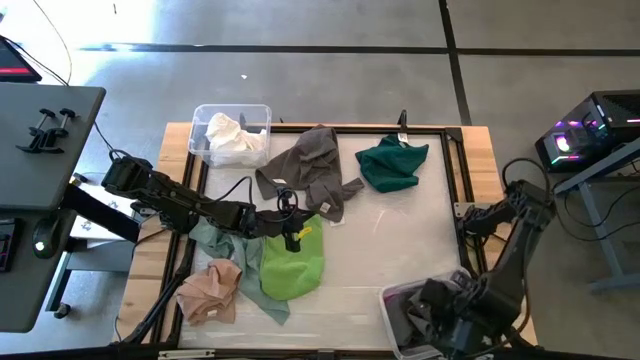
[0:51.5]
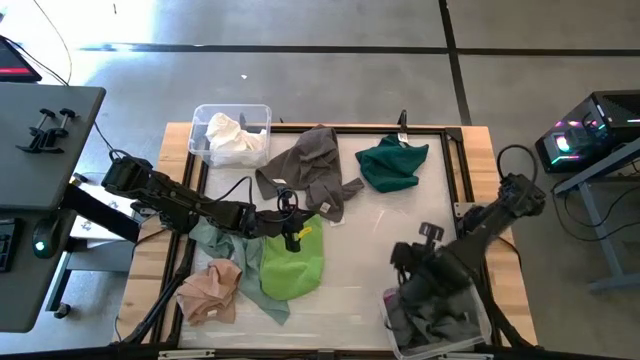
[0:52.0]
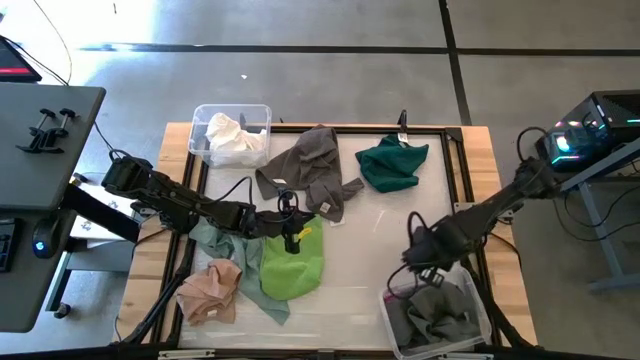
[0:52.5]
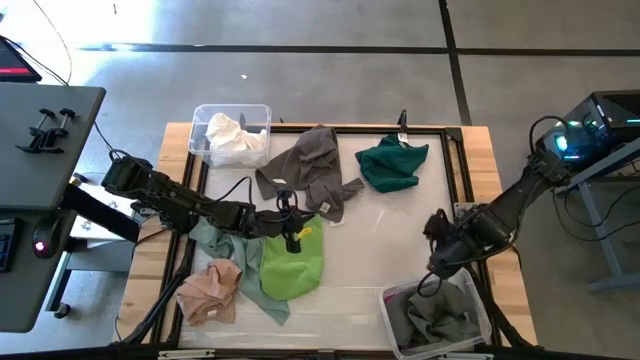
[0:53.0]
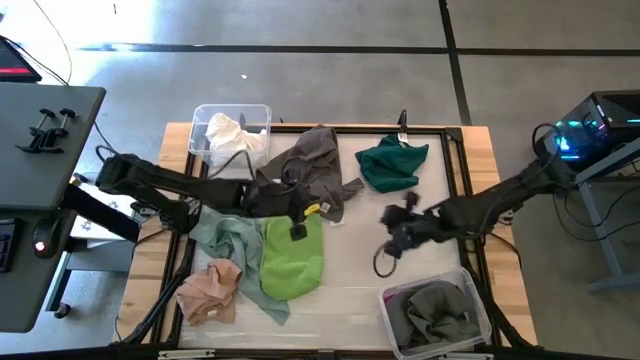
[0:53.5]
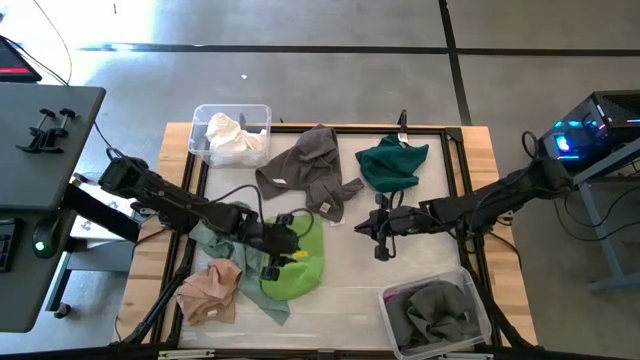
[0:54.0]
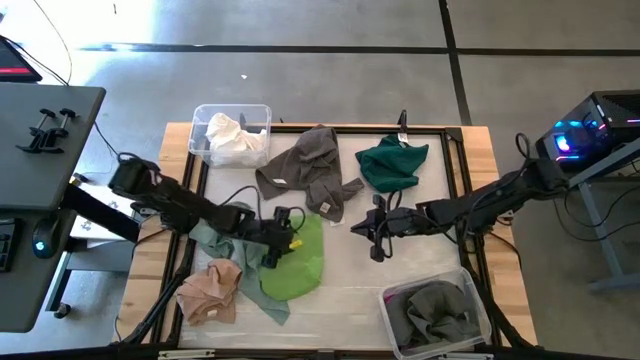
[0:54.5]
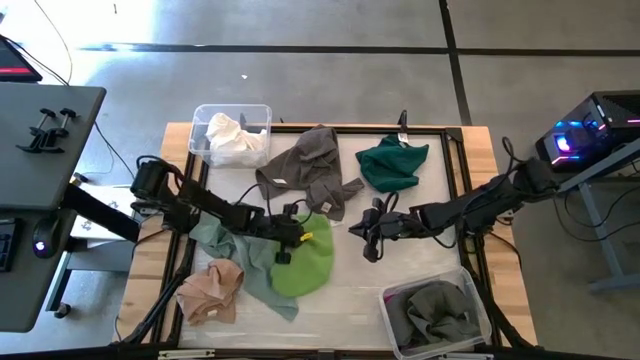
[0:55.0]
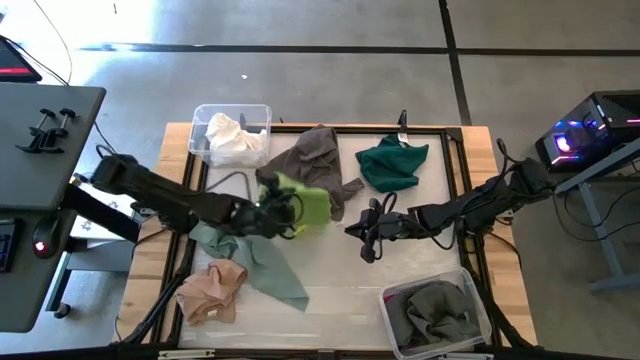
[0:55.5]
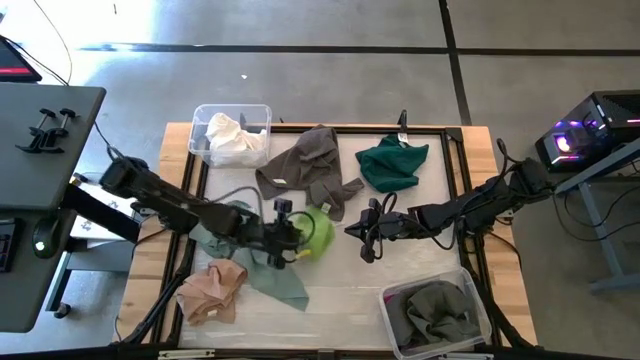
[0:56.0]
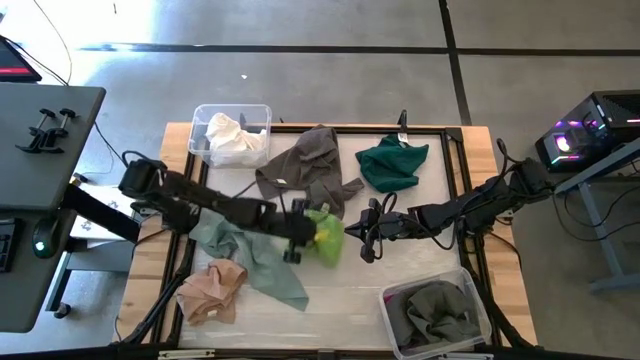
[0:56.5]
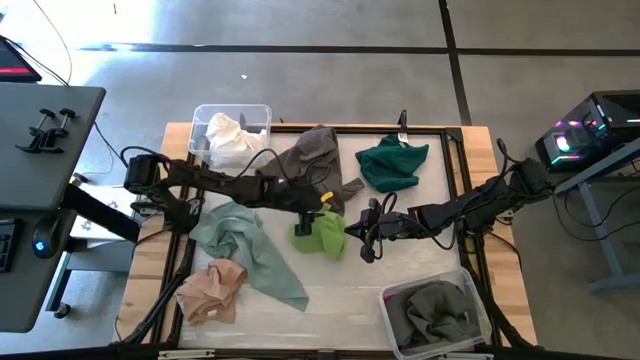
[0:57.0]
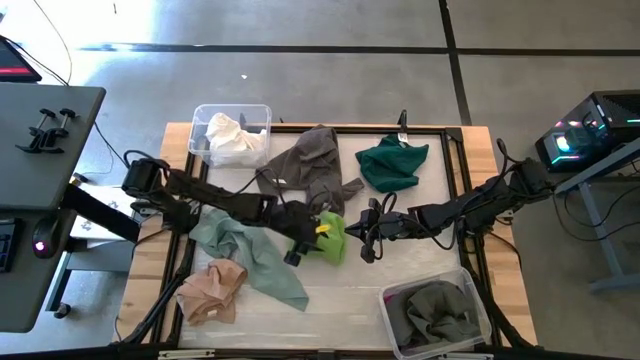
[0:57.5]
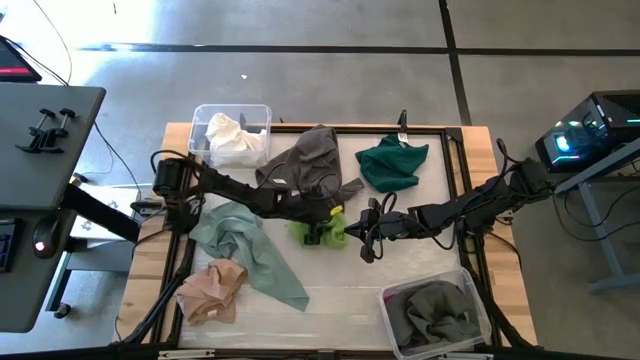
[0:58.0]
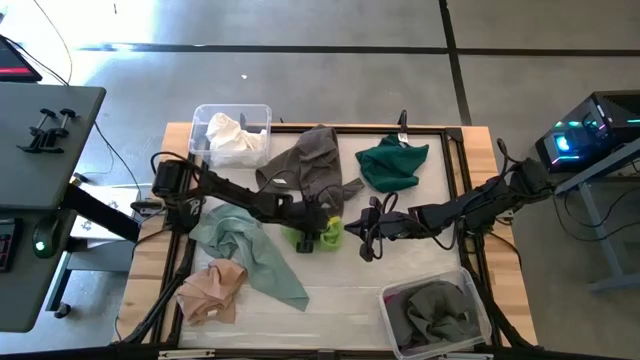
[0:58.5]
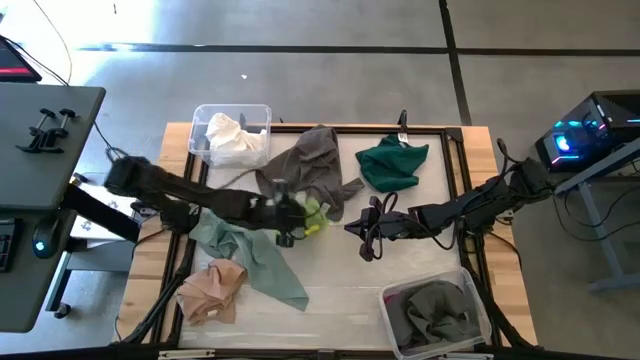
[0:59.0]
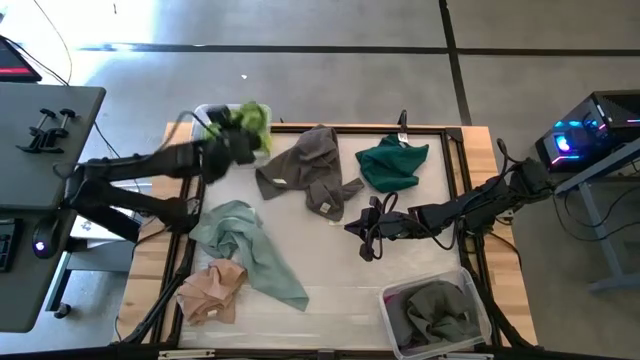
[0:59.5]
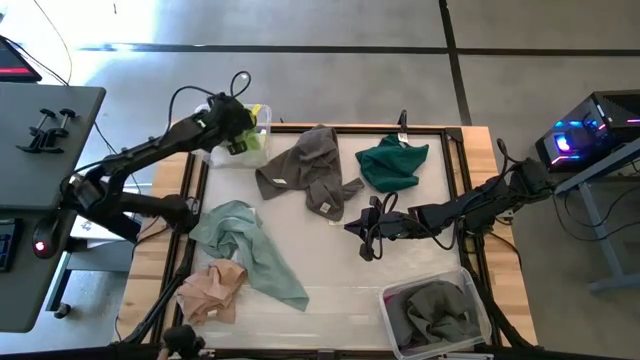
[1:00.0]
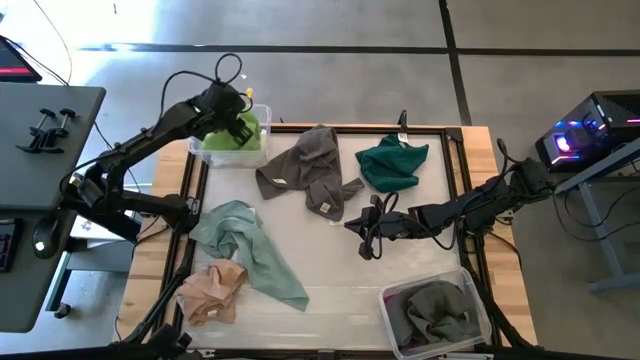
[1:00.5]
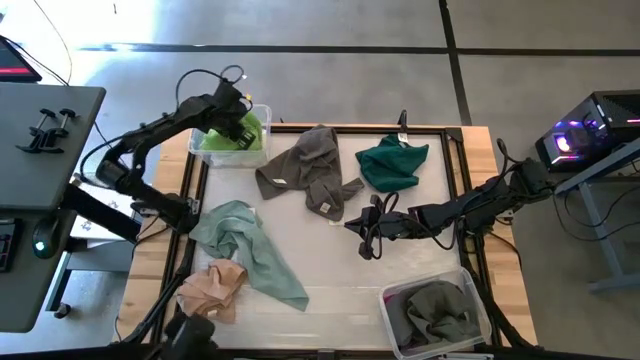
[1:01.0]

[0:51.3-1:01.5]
Task: Sort towels by color in basket
Put the light green towel into the top transparent bin

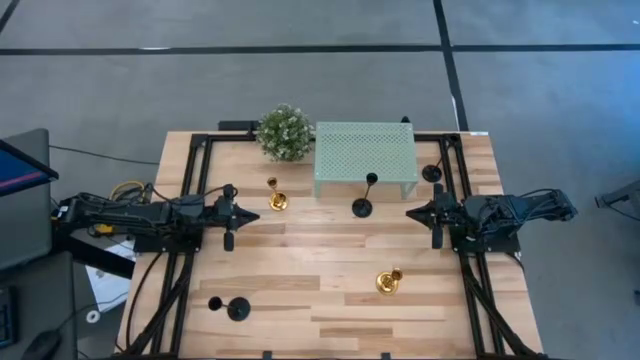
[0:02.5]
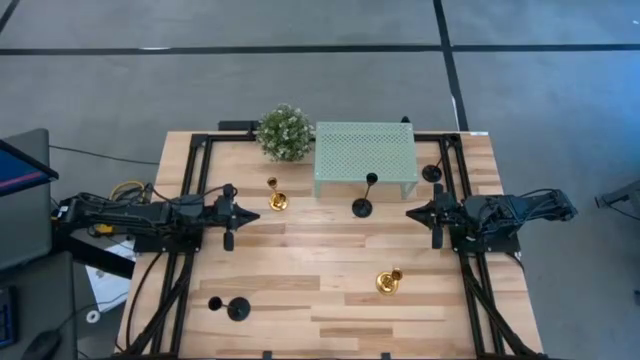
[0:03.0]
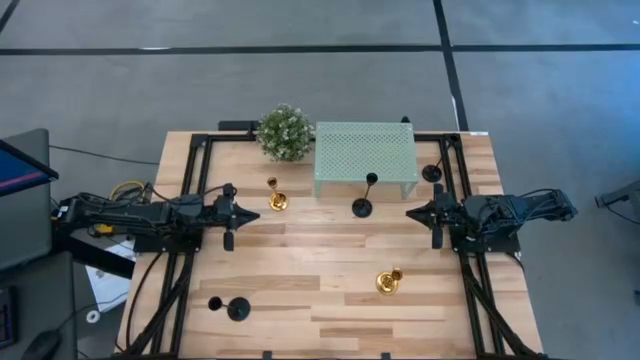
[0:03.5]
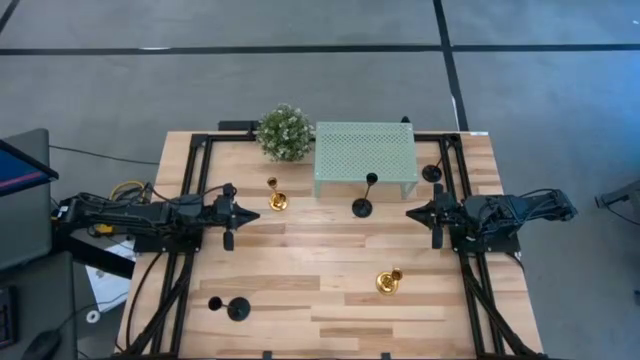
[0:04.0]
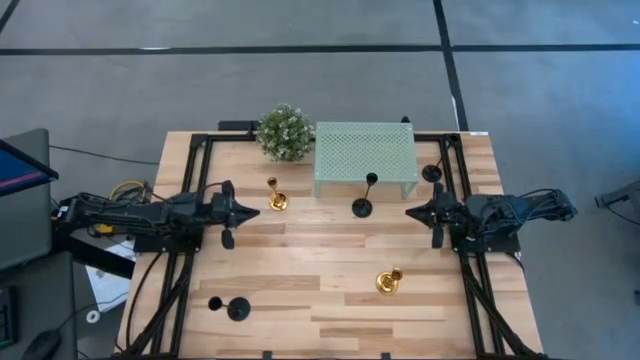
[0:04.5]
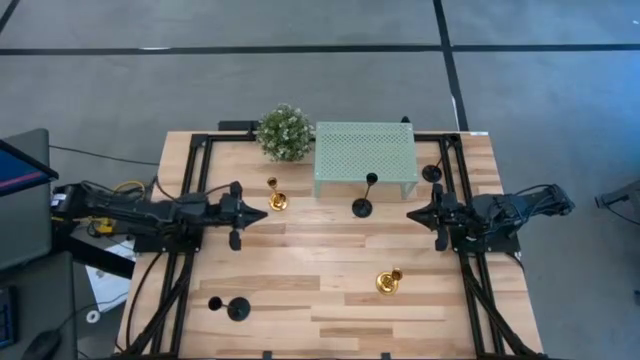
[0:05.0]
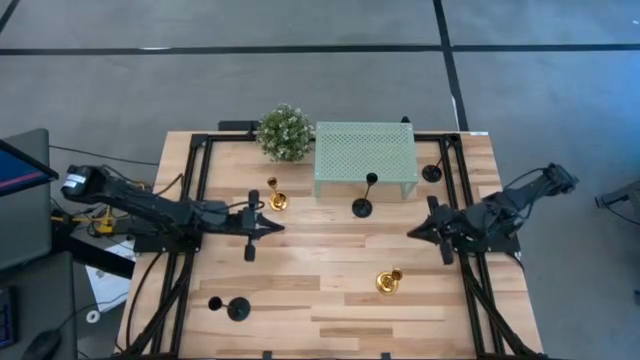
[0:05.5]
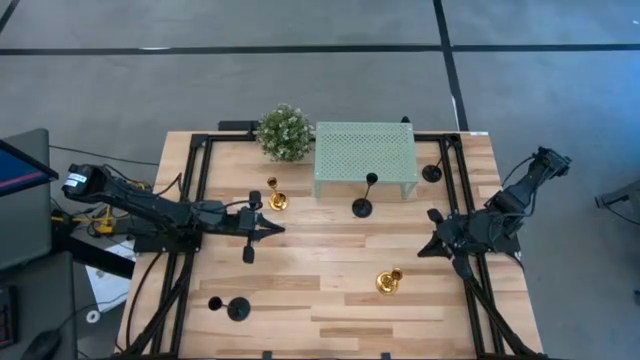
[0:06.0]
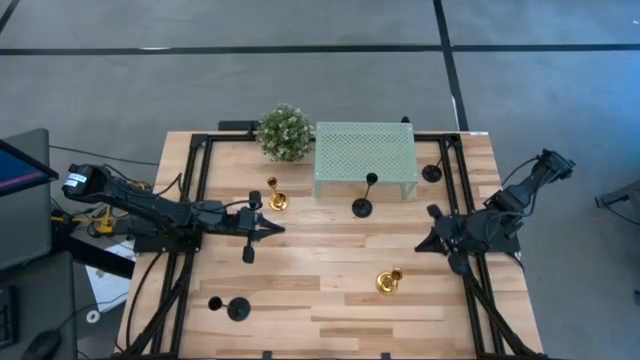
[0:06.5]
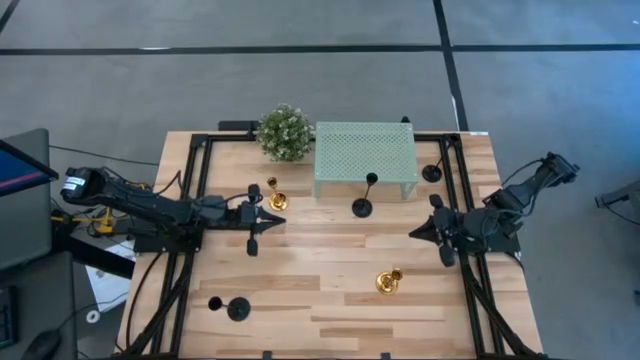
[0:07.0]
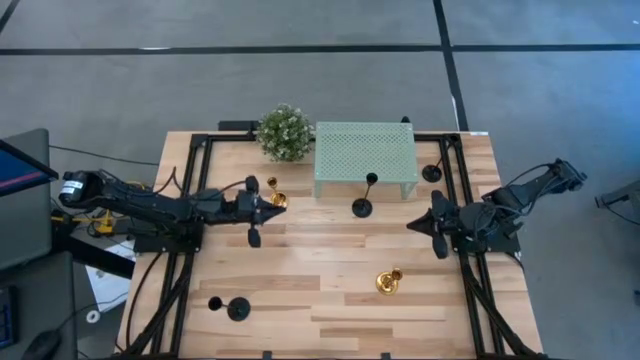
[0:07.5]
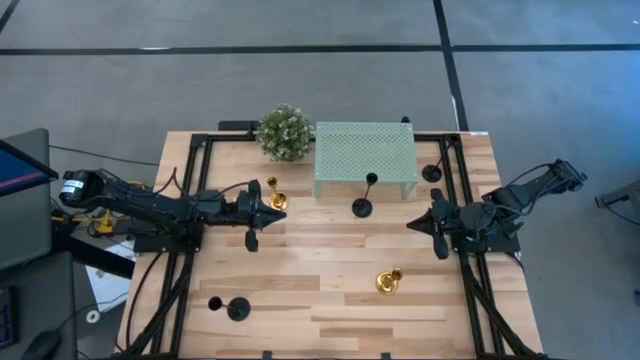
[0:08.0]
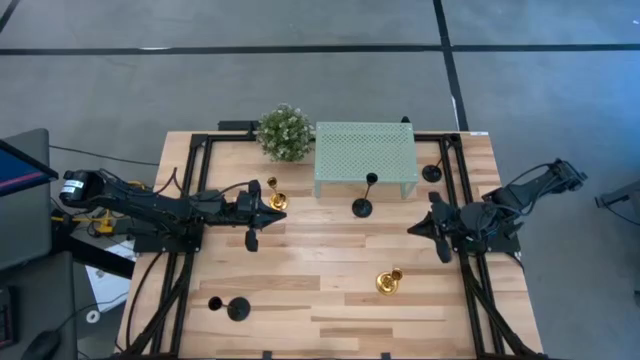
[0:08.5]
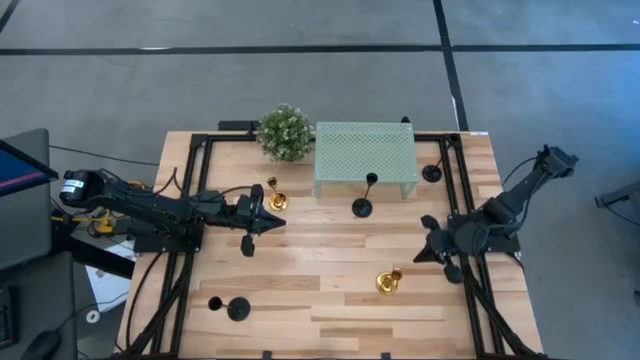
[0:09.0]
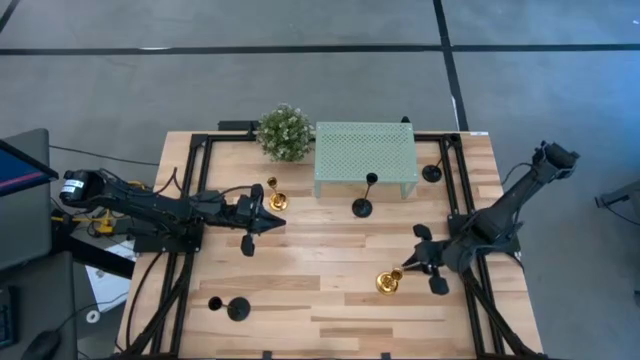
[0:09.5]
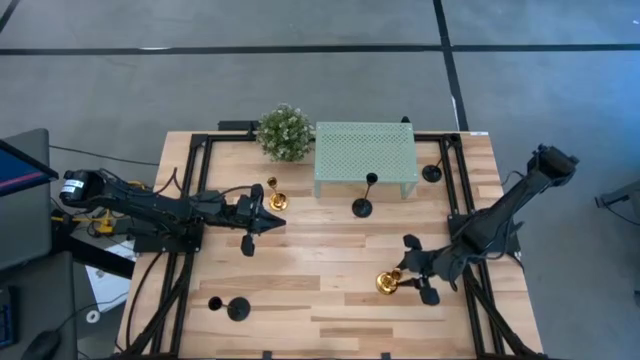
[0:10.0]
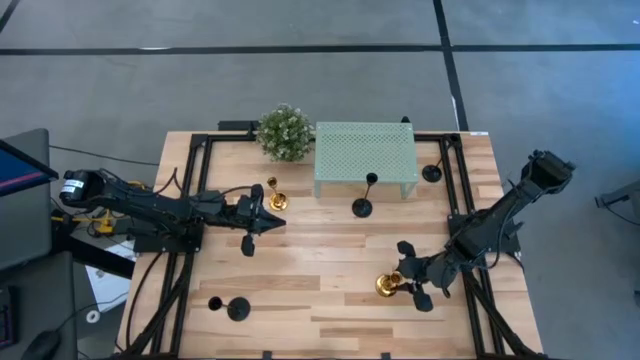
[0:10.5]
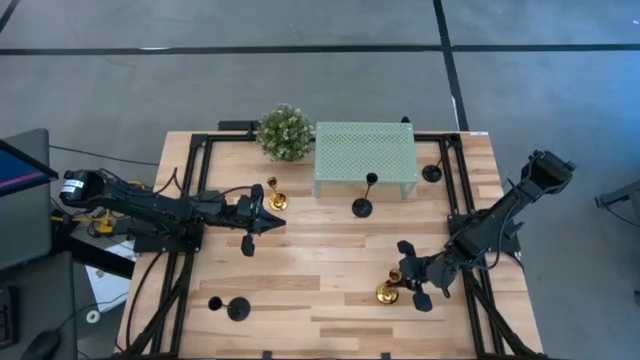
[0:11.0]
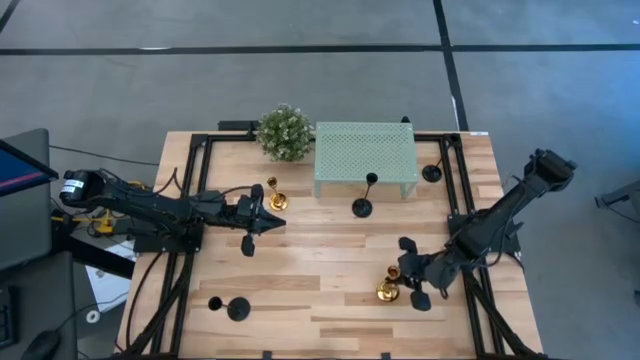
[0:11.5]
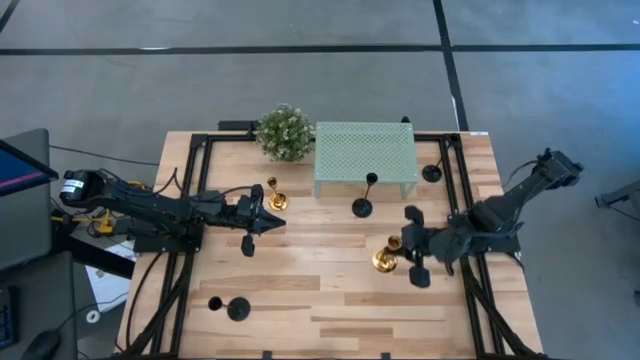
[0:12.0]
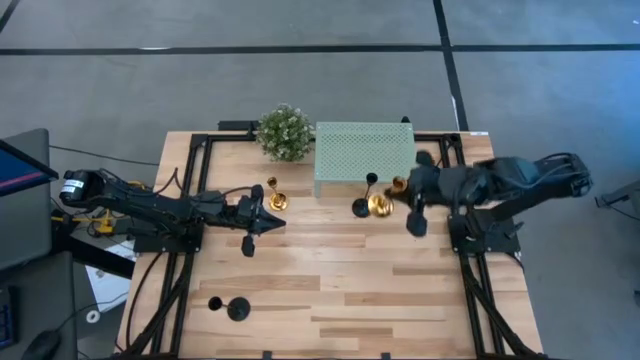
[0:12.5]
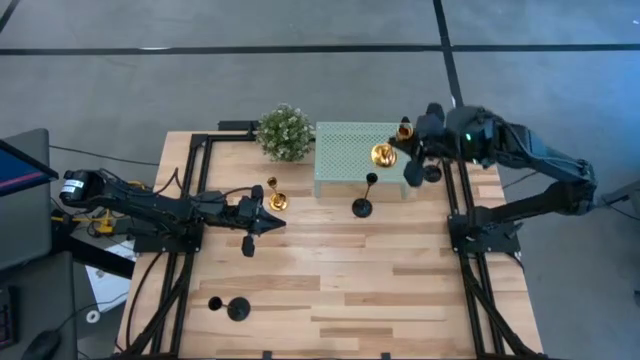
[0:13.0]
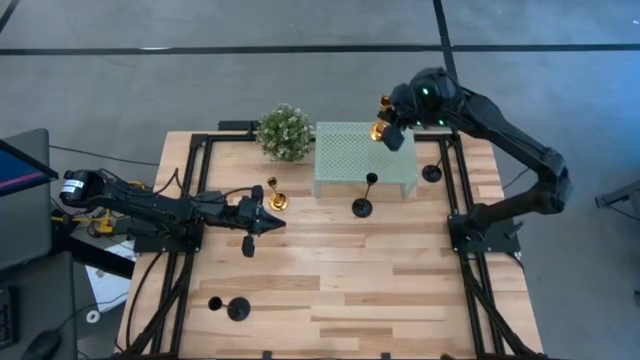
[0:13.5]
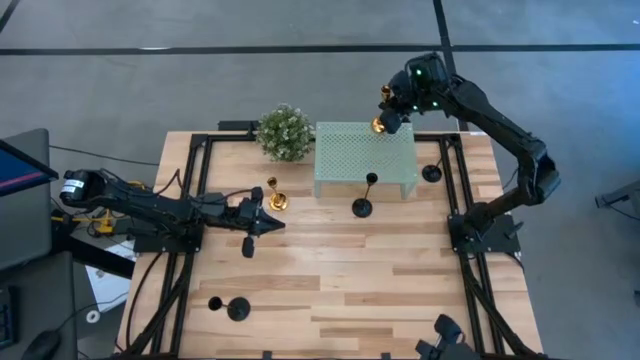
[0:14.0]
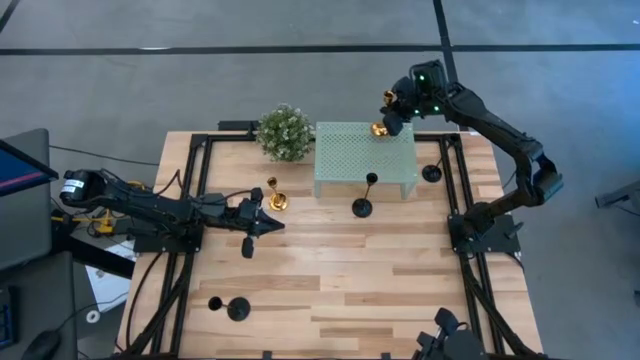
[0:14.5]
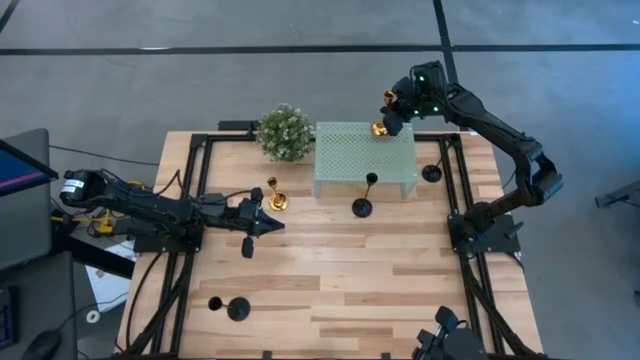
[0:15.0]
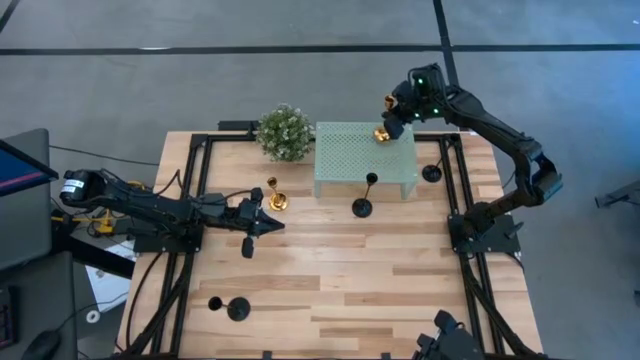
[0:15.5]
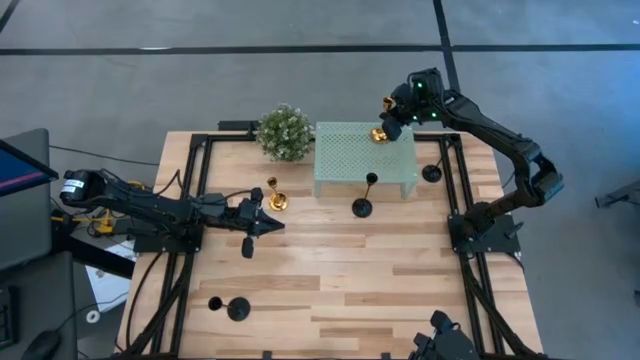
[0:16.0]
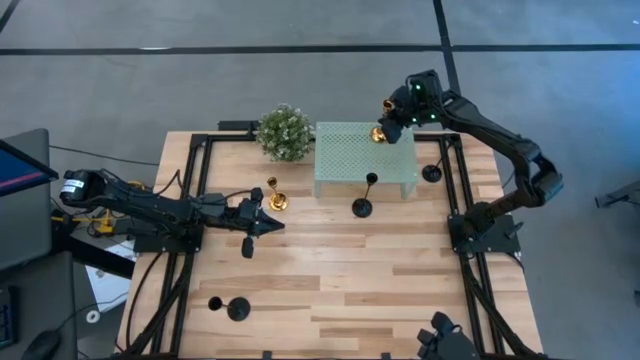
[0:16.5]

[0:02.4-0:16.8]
Task: Pick & Place candle stick holders
Put the bottom golden candle holder on the shelf
